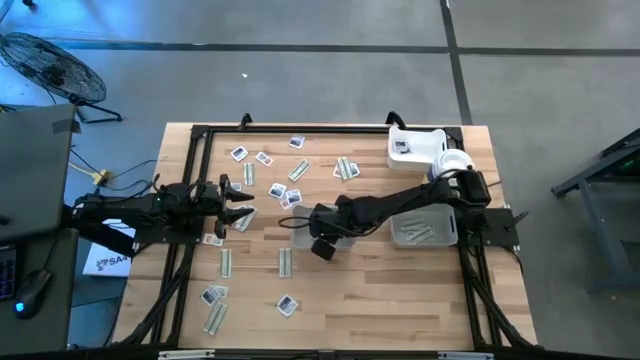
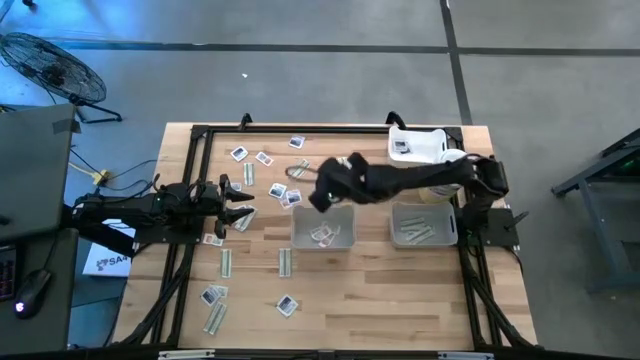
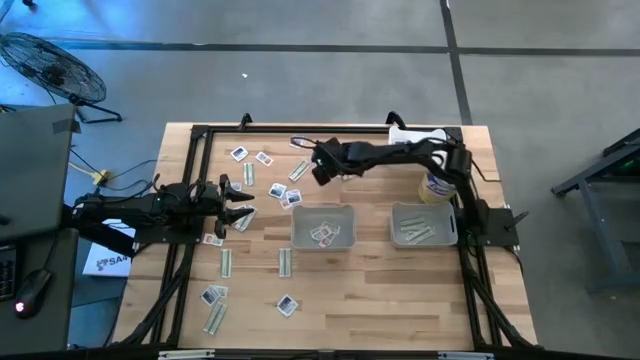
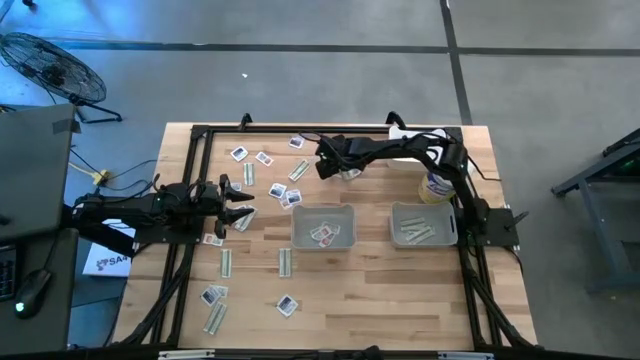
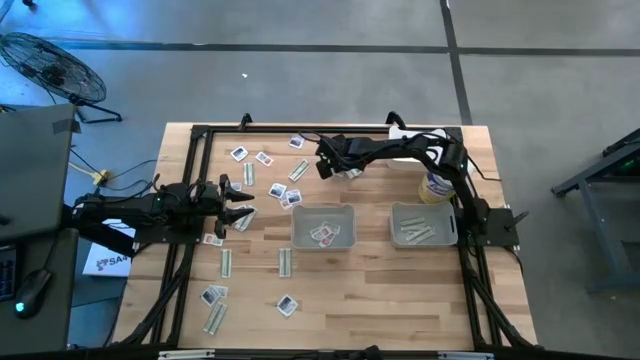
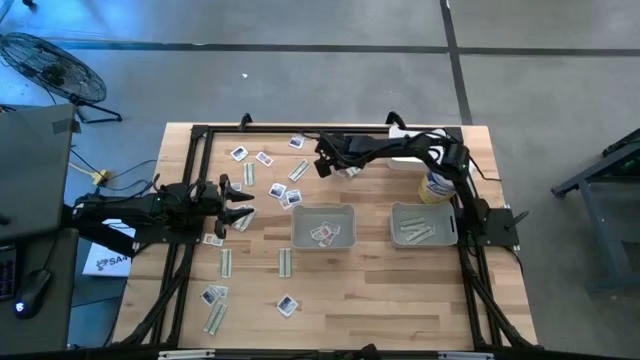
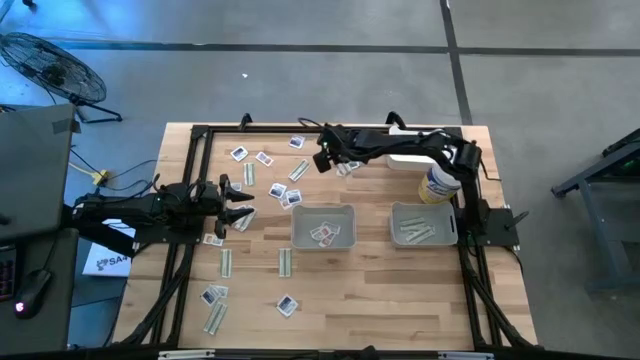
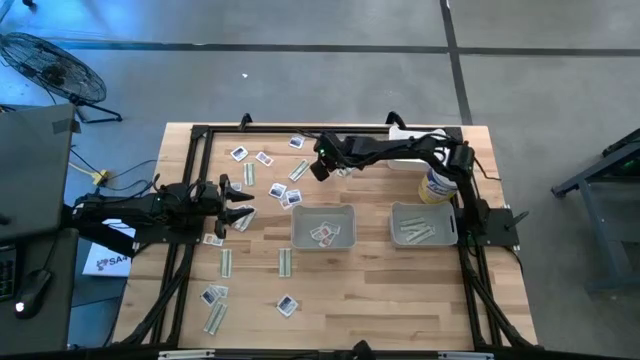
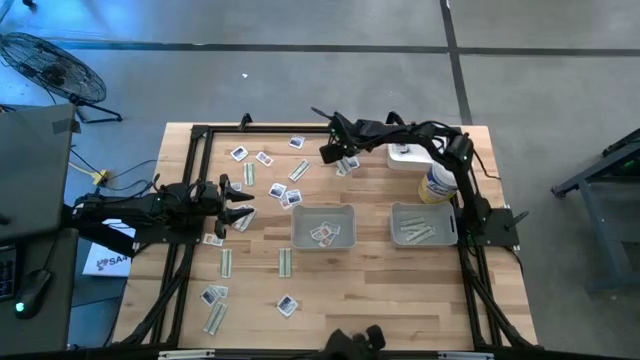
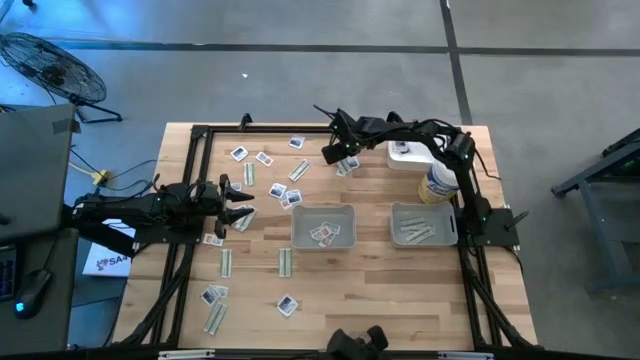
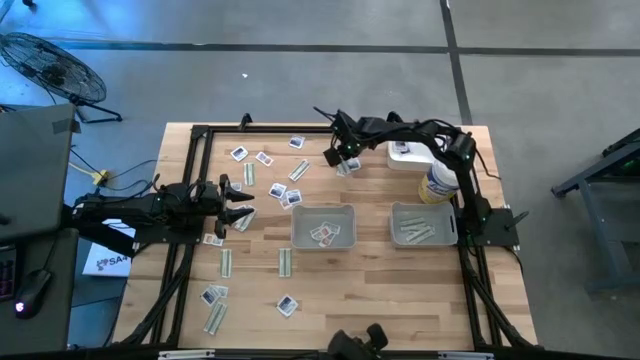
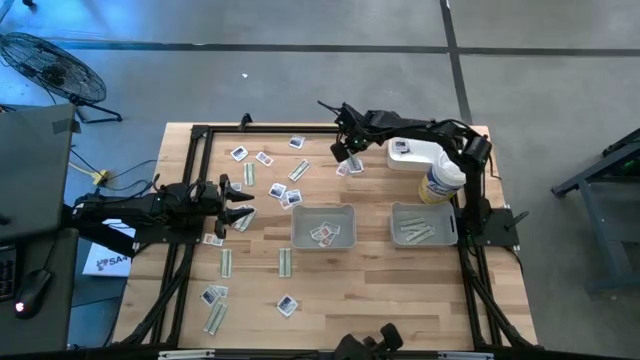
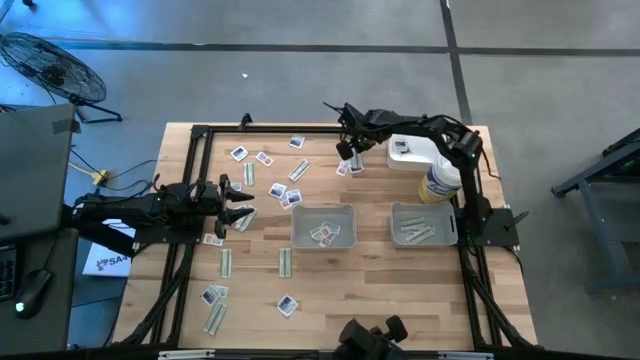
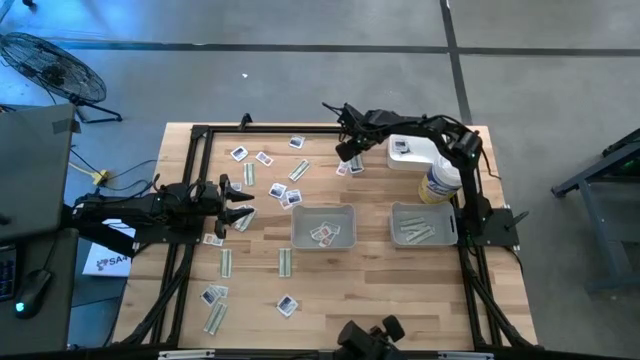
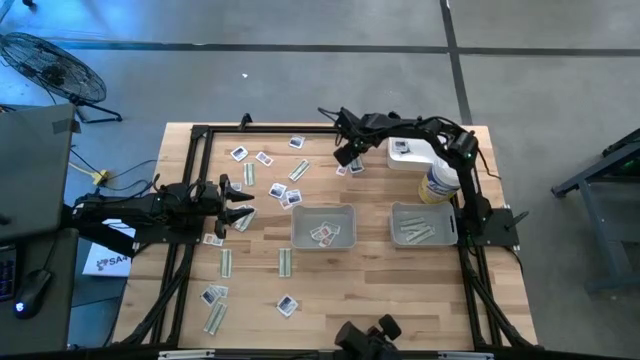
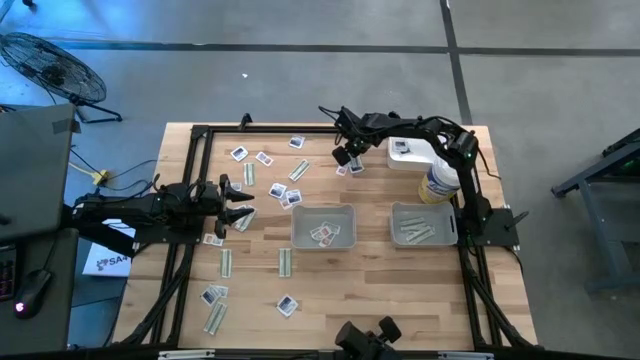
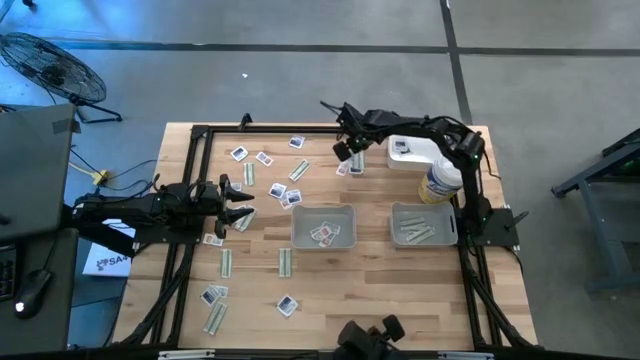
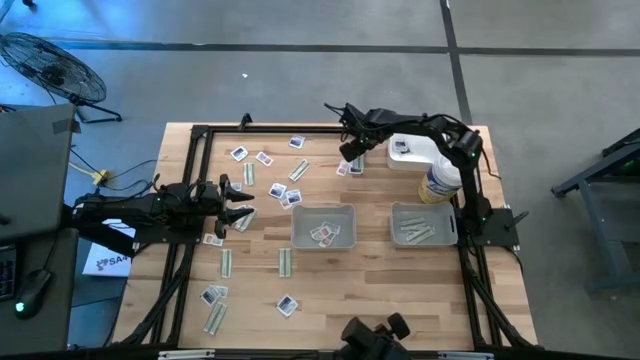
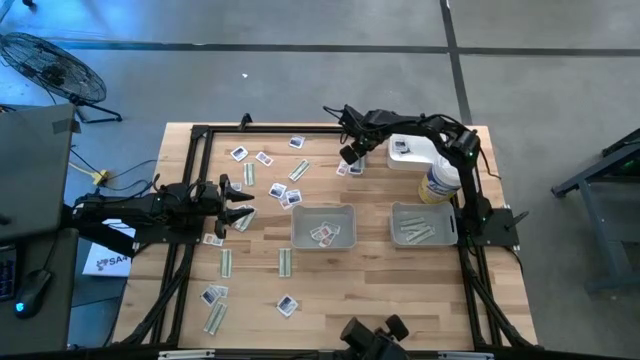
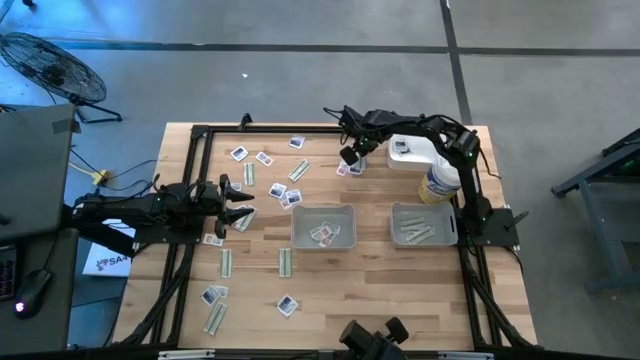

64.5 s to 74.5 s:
Task: Pick & Place First Aid Supplies
Put the green pad into the right gray bin

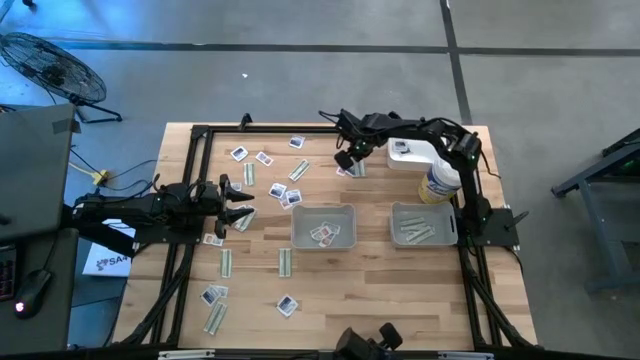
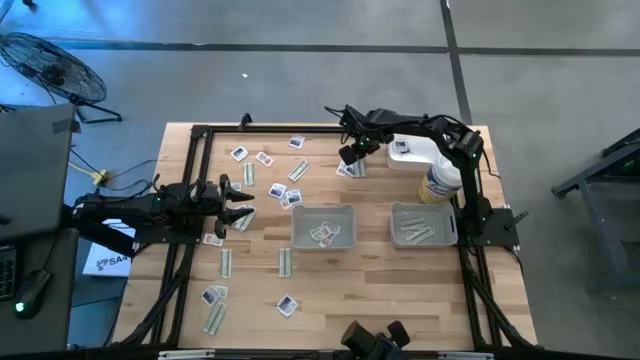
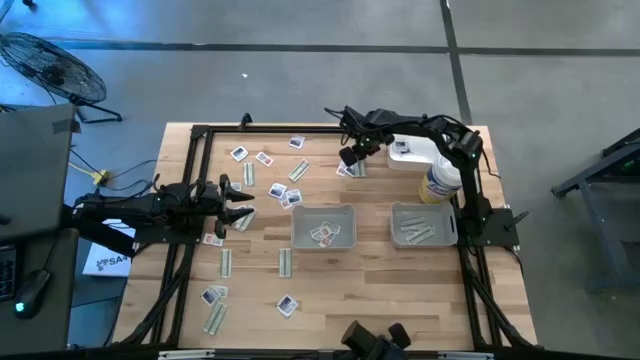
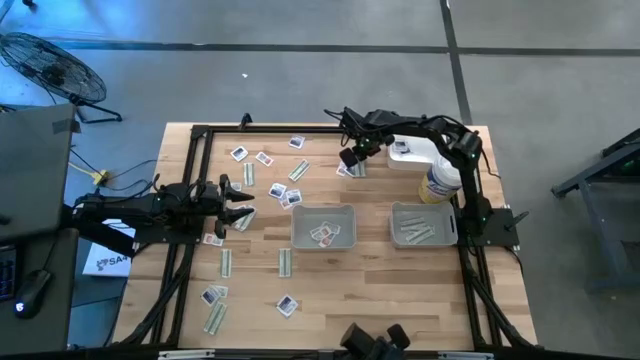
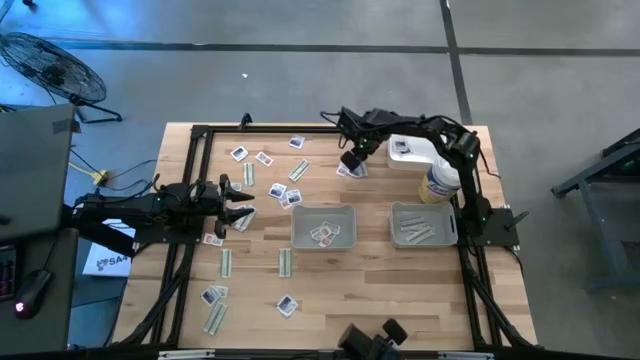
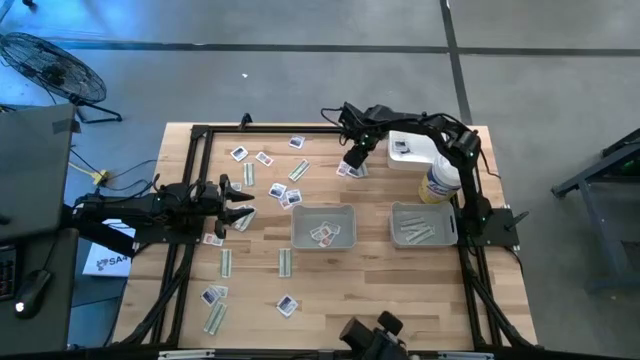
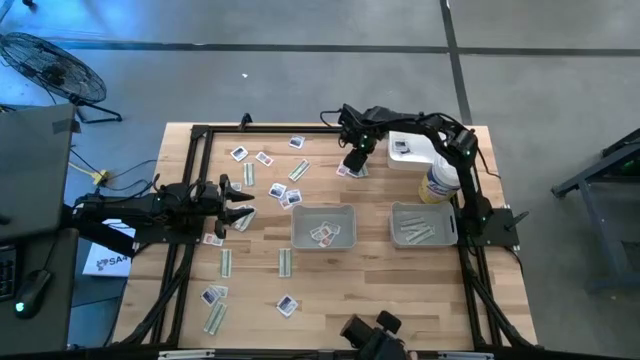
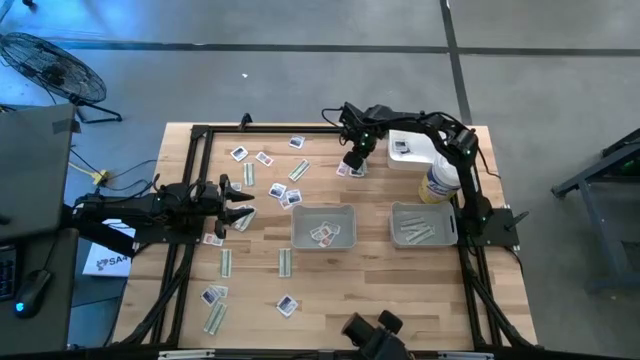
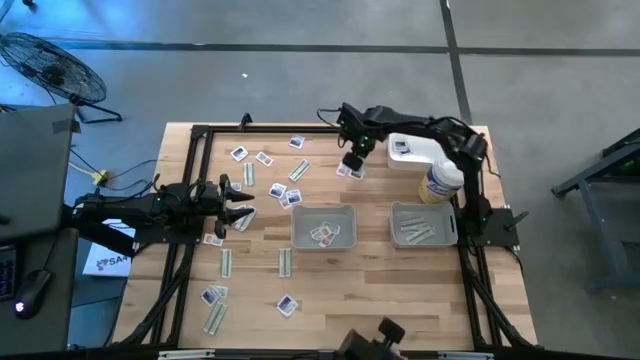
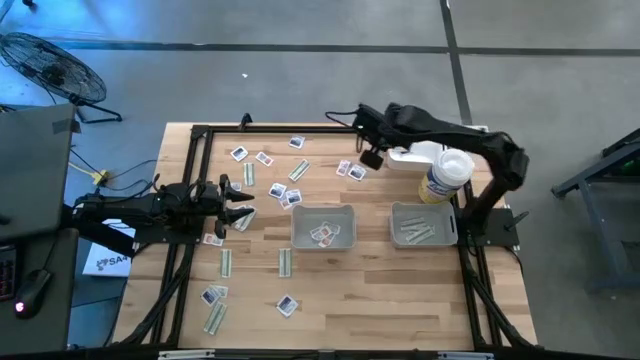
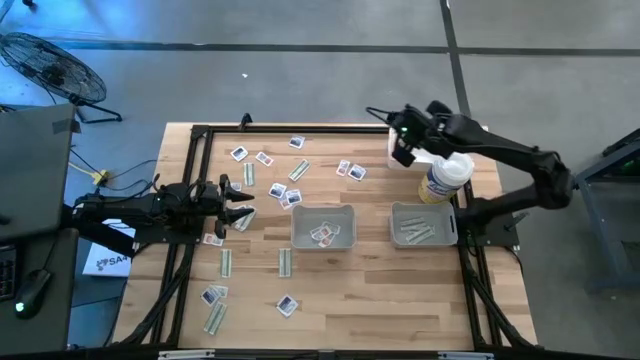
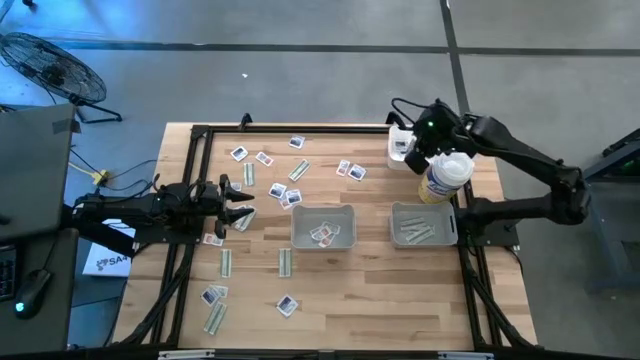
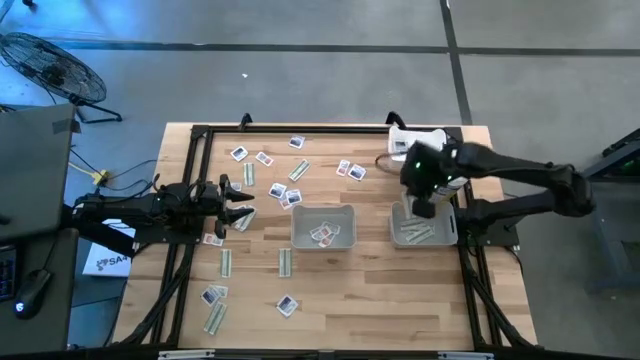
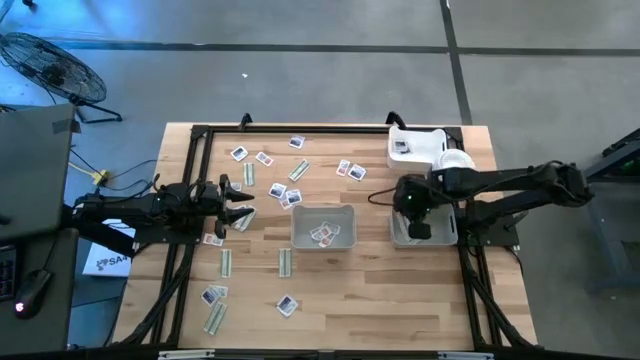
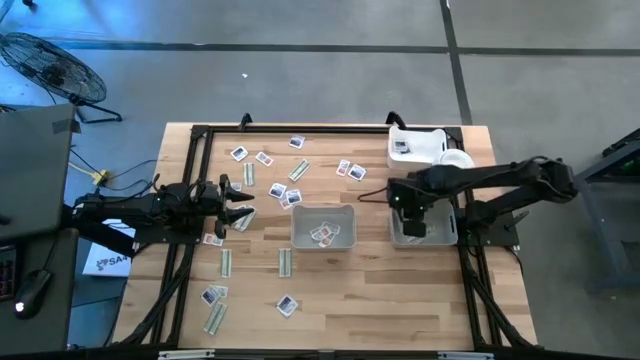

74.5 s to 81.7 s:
Put the green pad into the right gray bin

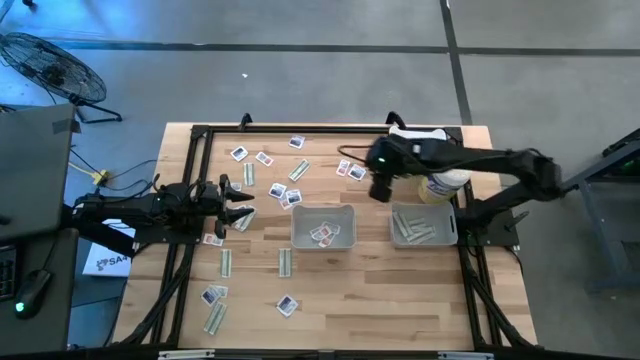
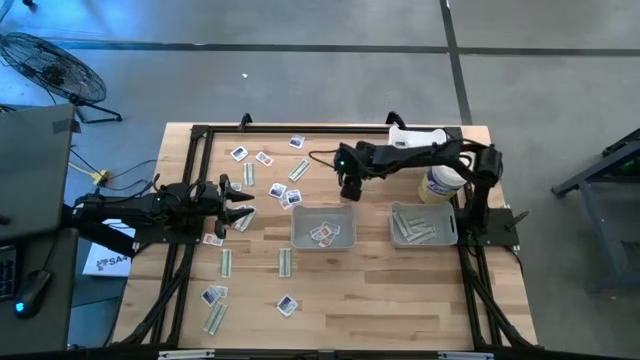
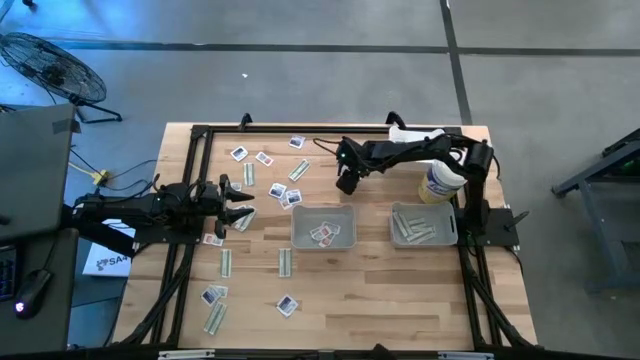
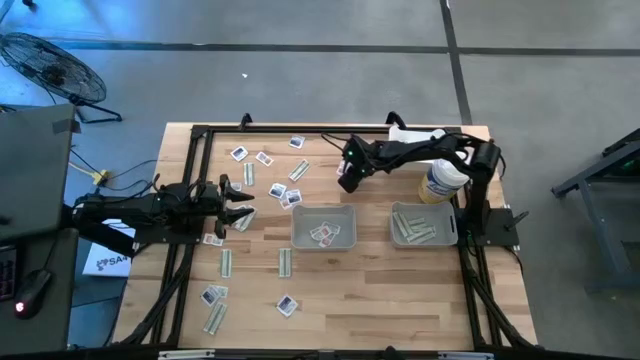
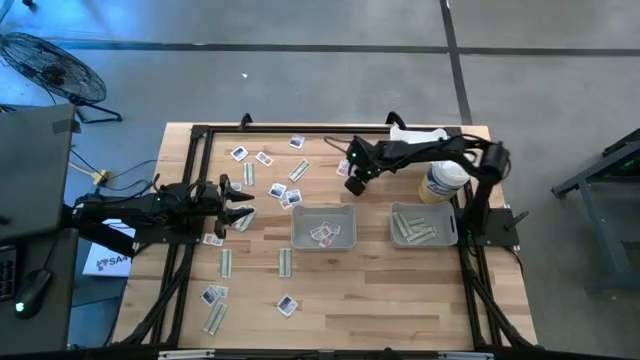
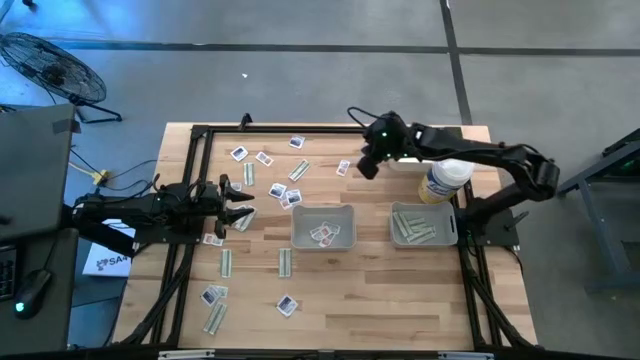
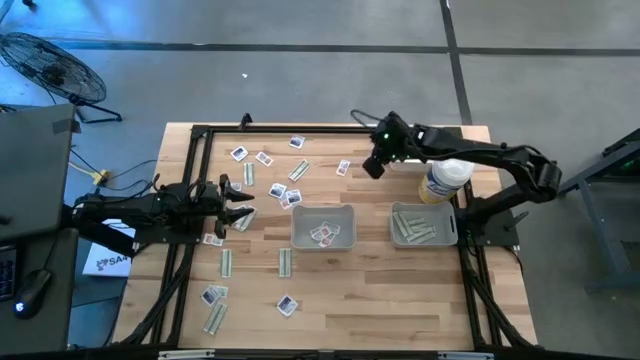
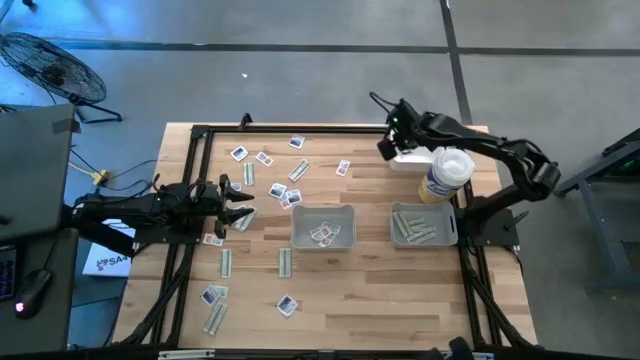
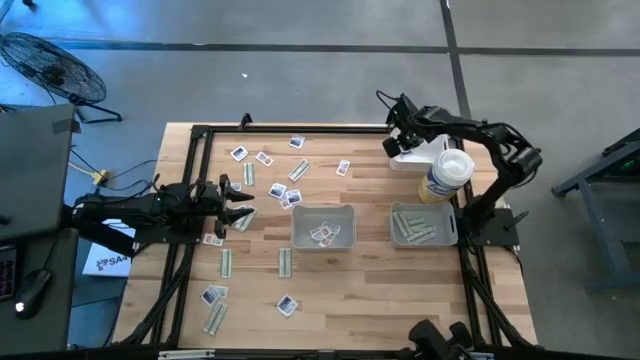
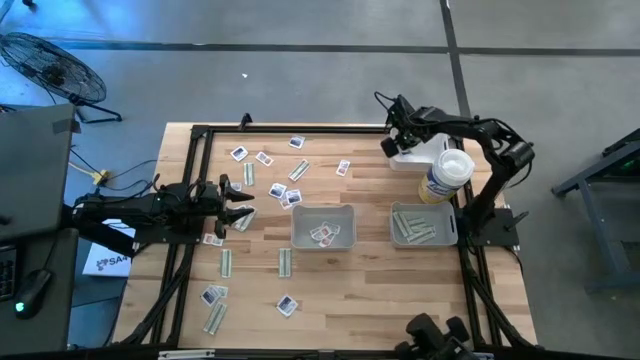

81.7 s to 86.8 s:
Put the blue pad into the white bin
